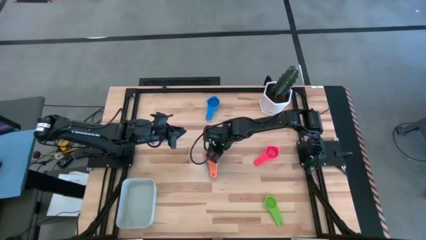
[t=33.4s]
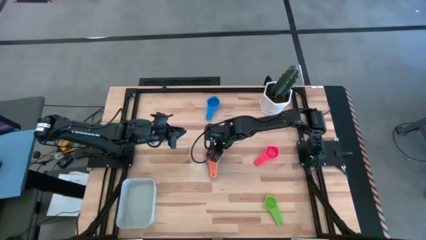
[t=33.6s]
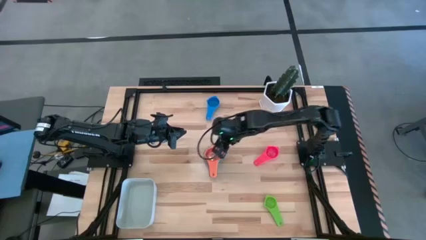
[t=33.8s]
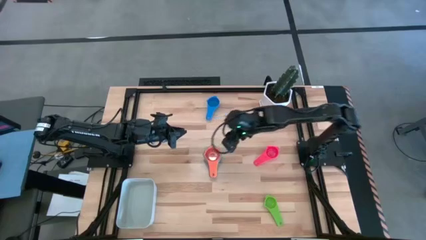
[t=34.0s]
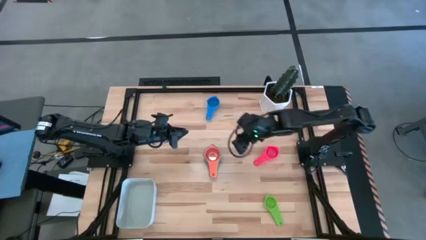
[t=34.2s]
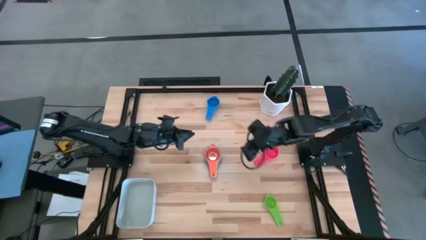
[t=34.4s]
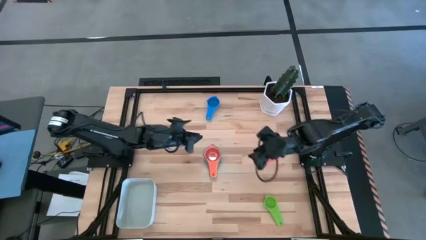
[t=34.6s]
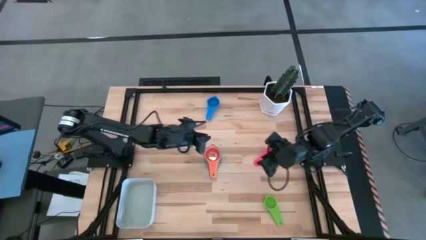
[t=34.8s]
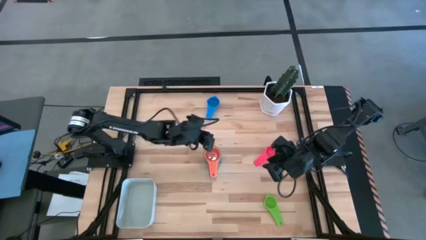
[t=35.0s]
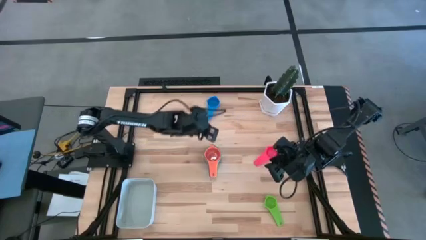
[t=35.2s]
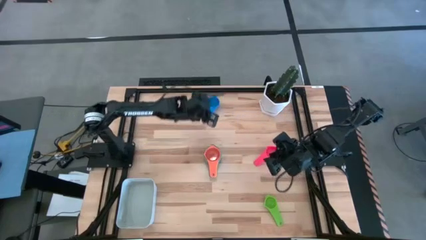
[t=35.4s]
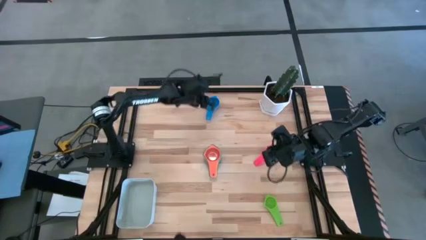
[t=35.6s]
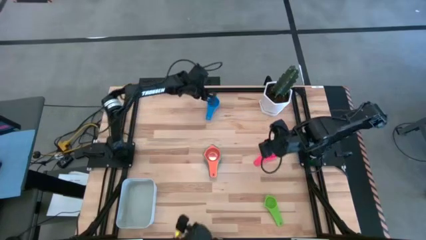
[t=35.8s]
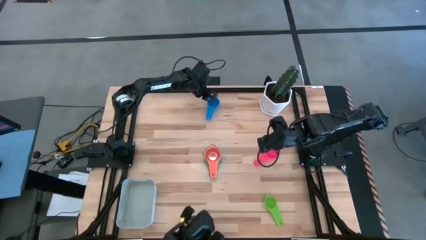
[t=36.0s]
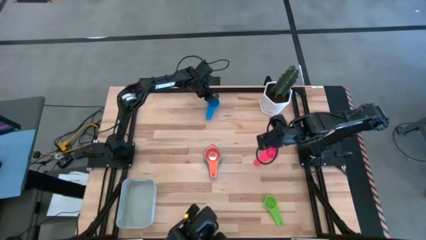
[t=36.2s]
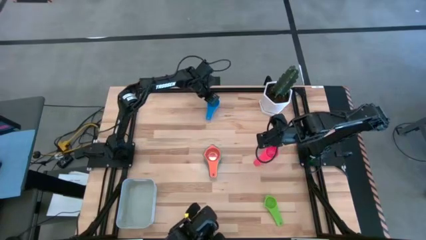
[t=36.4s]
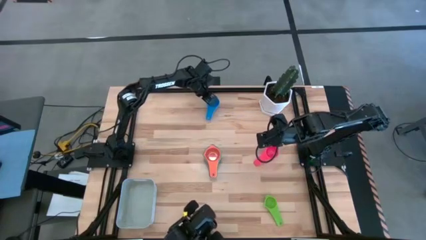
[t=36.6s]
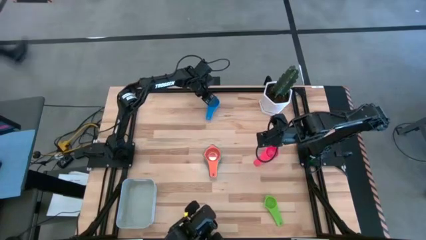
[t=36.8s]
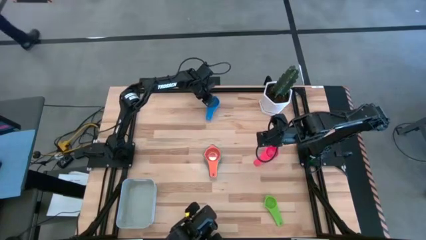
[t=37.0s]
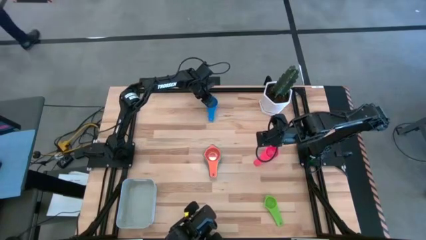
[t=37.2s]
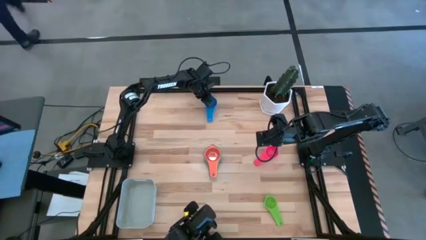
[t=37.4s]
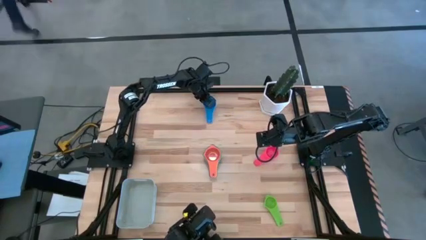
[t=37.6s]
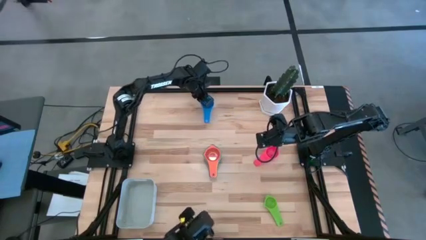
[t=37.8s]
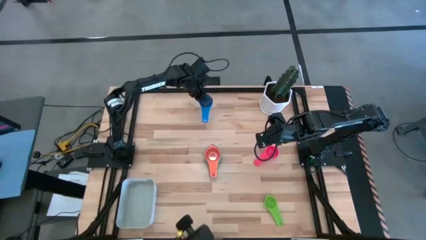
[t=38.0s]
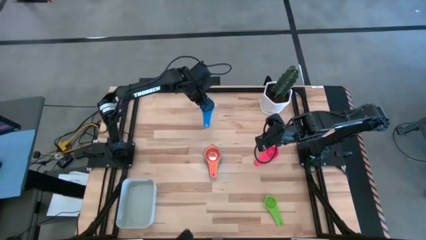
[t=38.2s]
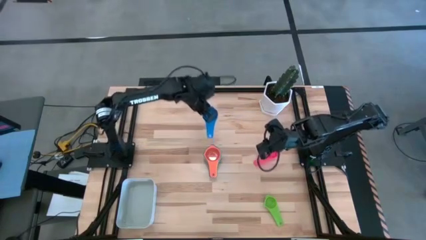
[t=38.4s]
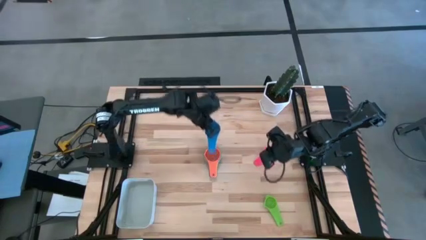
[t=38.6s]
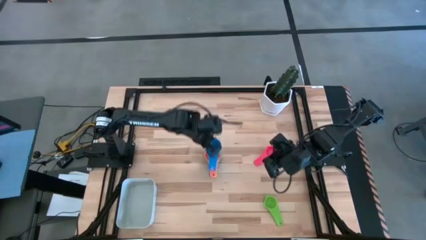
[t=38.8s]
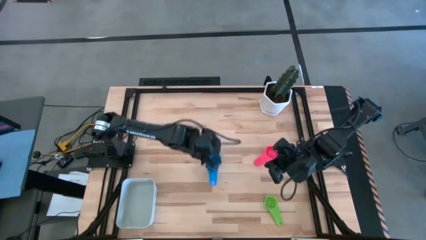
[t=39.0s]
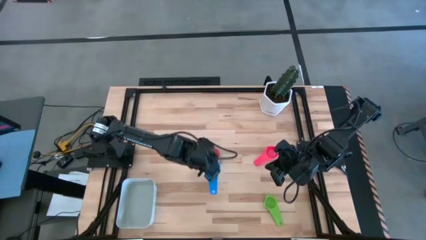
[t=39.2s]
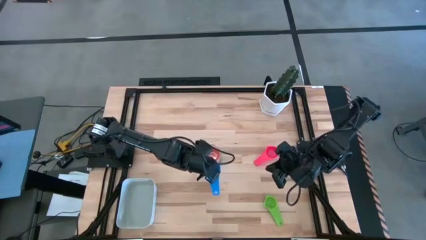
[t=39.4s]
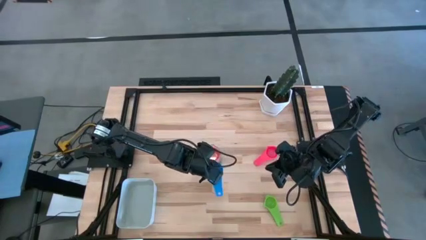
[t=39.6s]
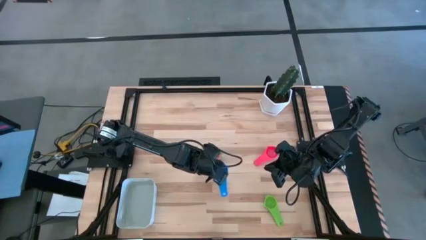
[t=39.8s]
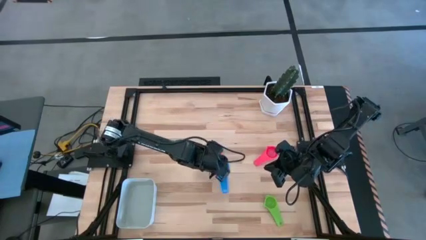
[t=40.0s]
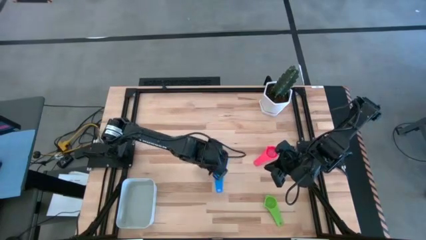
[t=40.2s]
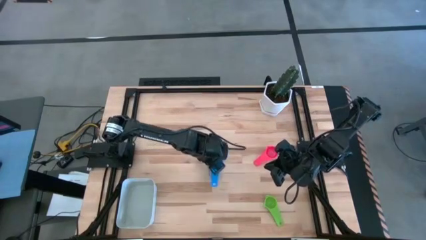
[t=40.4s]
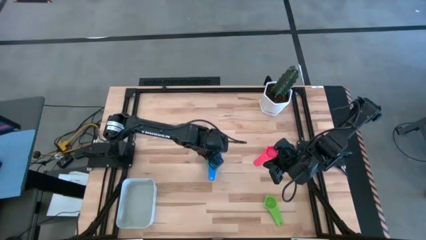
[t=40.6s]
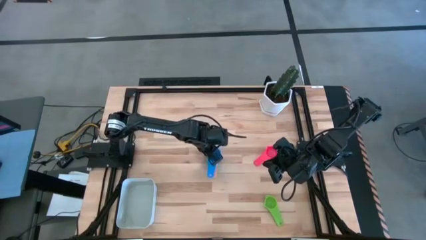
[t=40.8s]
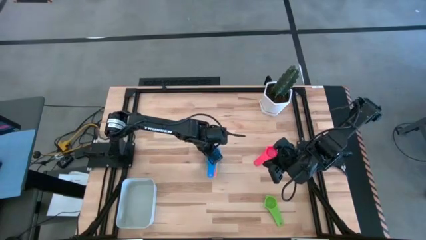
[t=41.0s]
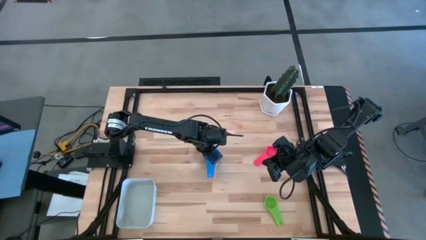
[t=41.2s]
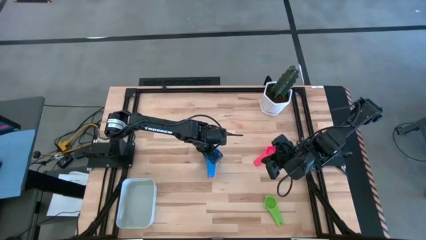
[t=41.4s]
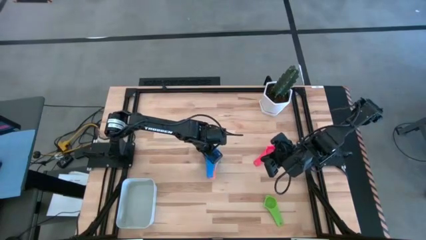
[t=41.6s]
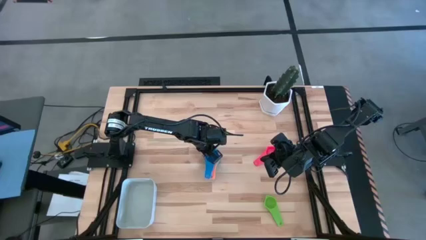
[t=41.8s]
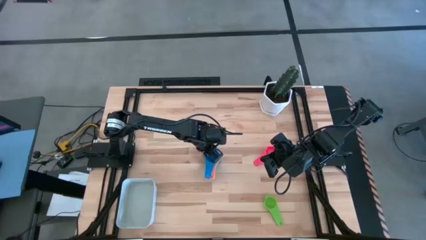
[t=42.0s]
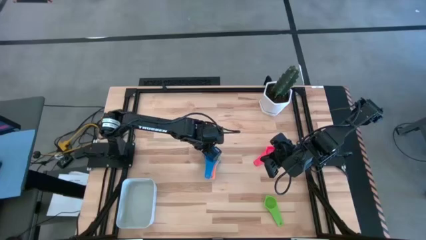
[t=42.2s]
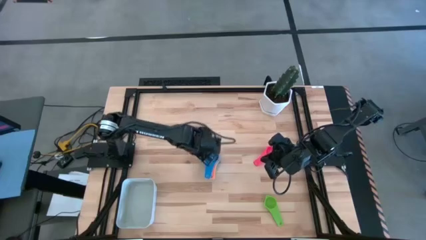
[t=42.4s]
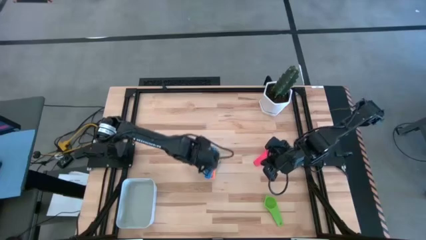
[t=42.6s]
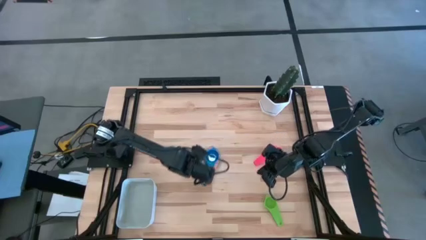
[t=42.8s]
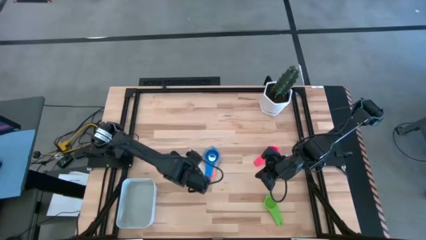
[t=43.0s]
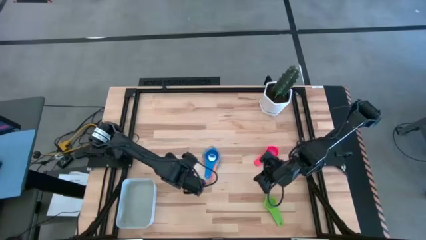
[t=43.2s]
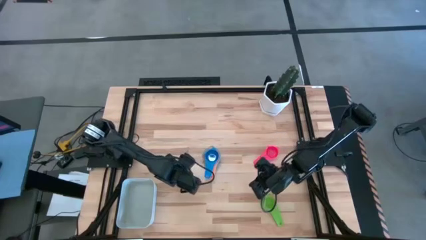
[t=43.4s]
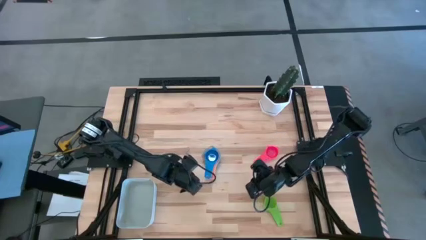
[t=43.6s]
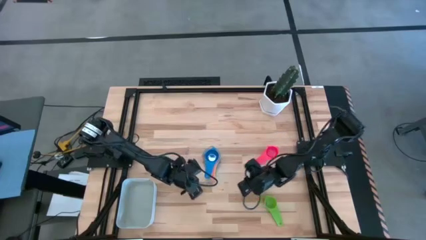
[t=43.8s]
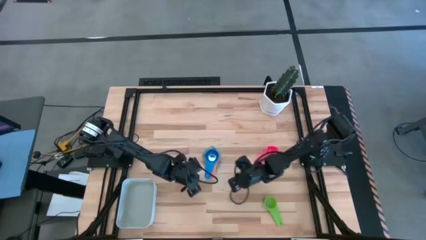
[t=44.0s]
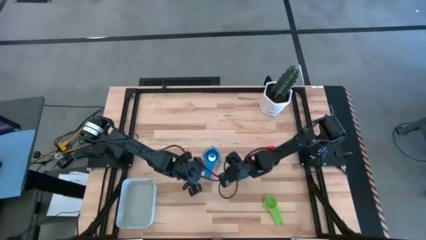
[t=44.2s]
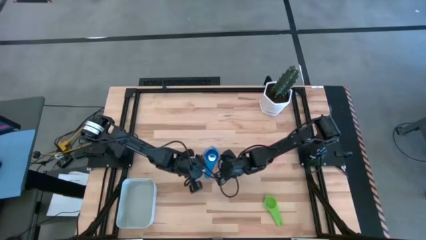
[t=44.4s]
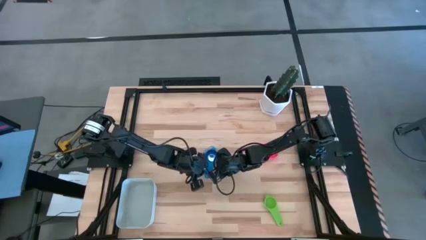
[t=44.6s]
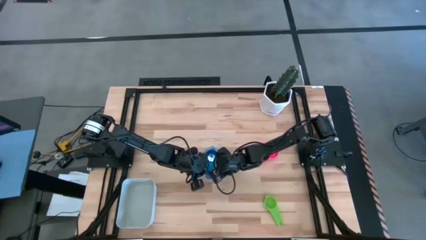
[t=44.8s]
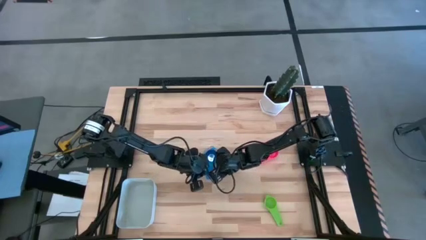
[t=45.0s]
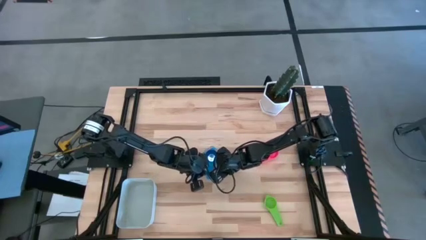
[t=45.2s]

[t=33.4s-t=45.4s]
Task: Nest measuring cups in basket
Stack the blue measuring cup on top of the orange measuring cup

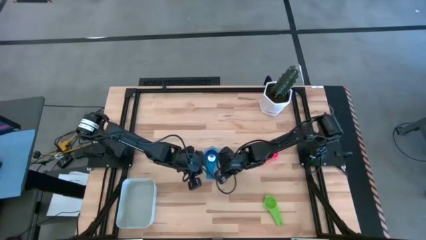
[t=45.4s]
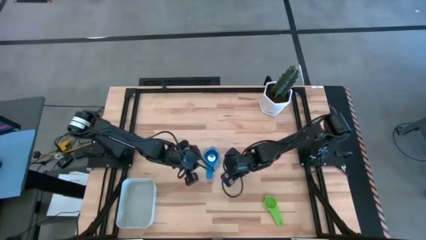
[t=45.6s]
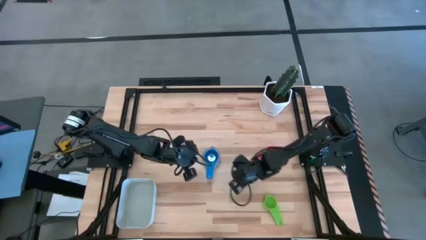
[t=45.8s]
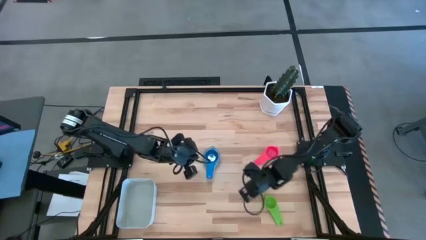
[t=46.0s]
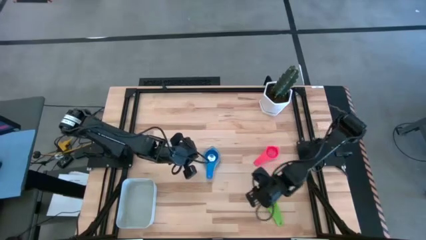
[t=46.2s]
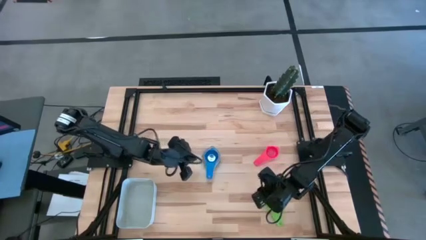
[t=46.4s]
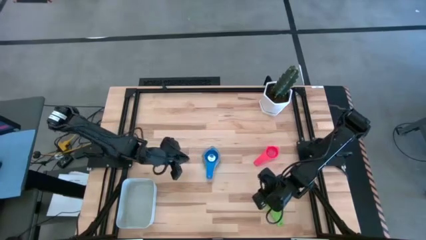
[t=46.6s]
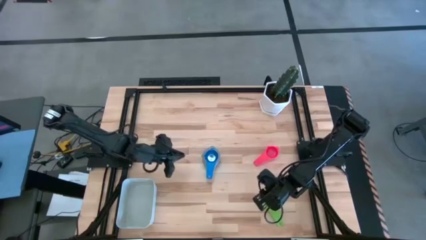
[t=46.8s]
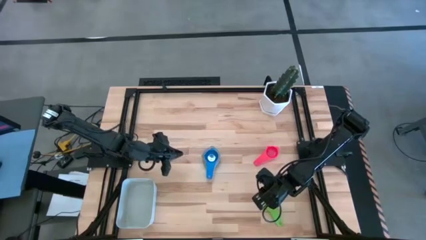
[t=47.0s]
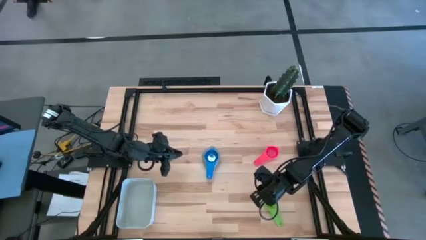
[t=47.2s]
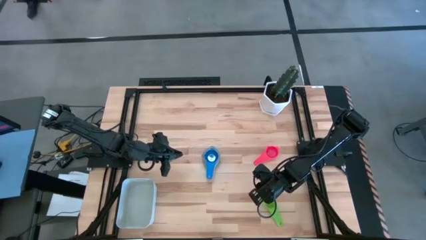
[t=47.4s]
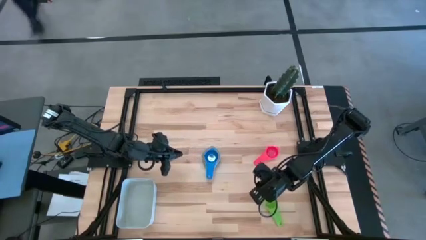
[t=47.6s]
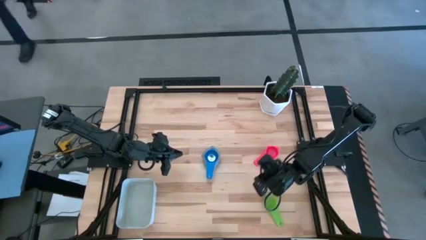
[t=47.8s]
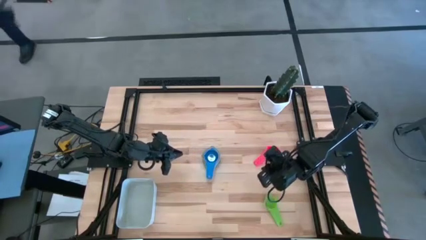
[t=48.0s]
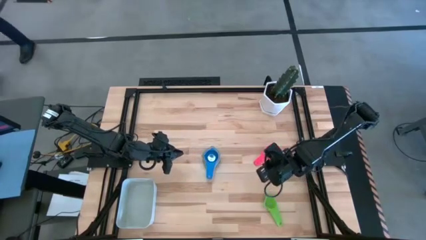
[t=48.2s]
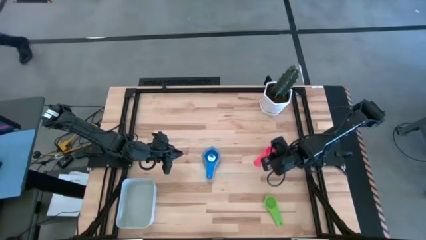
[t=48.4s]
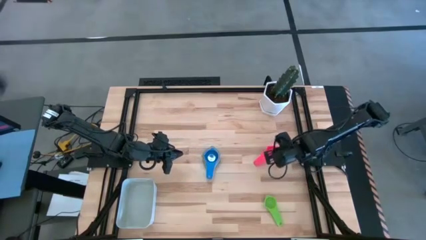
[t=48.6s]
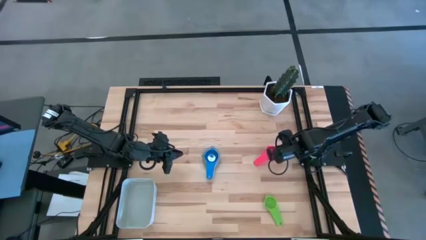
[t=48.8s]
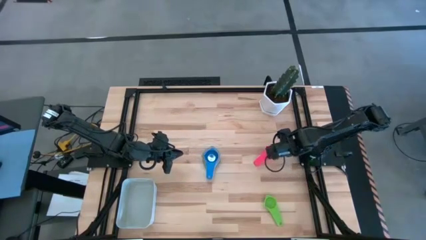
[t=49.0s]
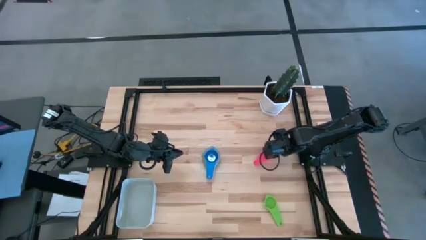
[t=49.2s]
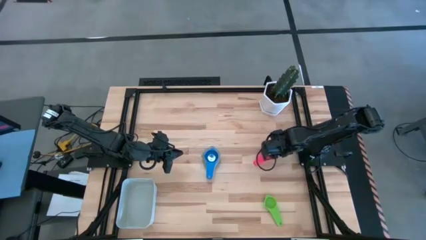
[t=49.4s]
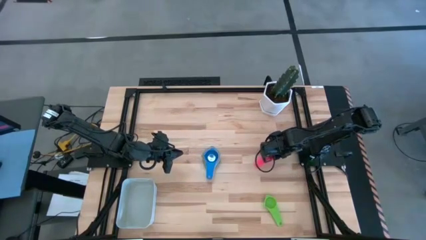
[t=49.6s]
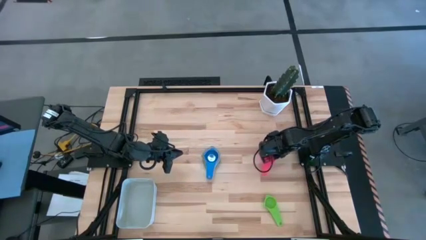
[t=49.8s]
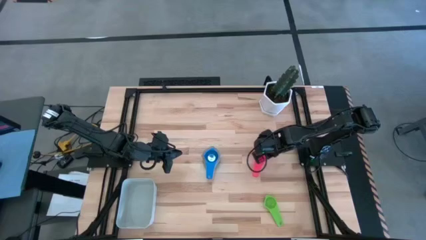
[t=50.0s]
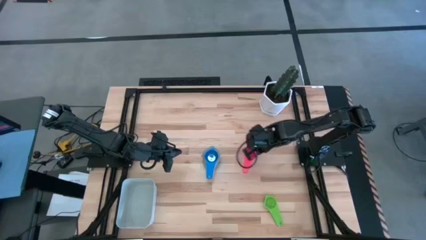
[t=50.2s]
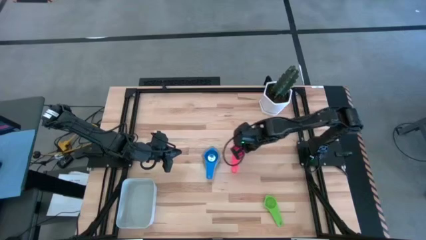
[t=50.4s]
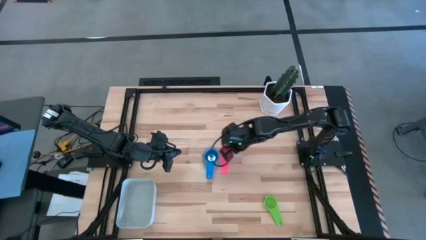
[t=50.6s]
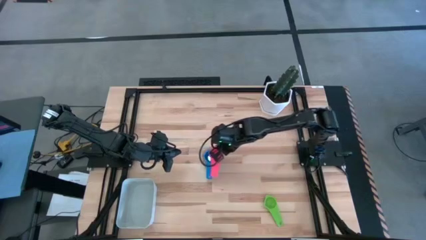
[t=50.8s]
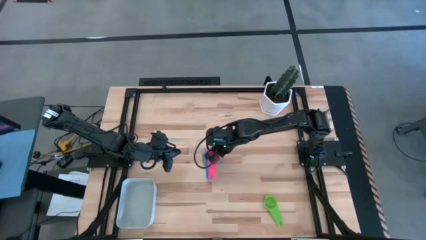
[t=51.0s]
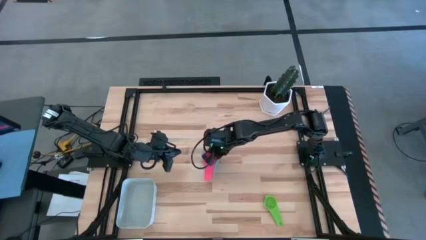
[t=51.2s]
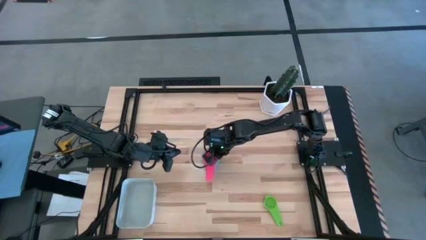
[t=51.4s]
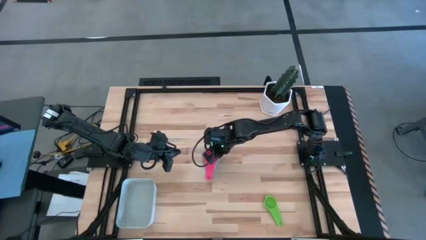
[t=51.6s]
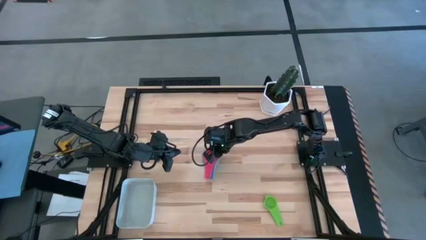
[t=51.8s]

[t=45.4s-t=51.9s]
Stack the pink measuring cup on top of the blue measuring cup
